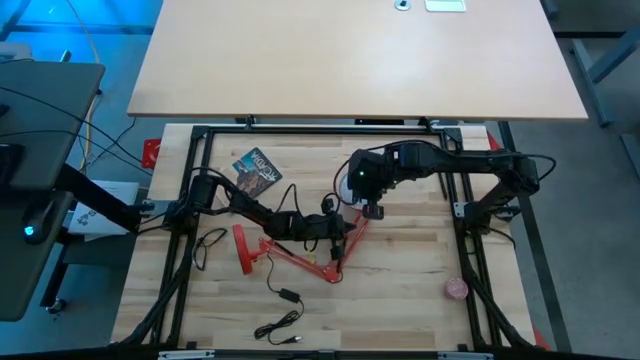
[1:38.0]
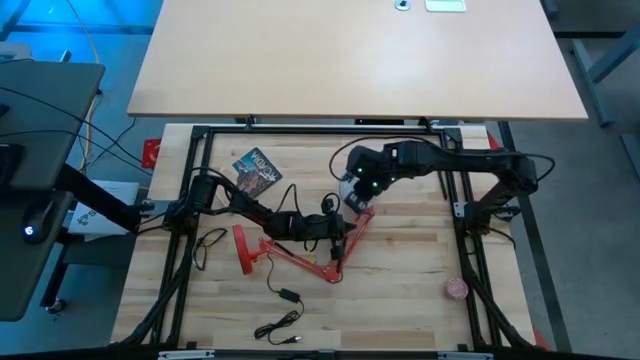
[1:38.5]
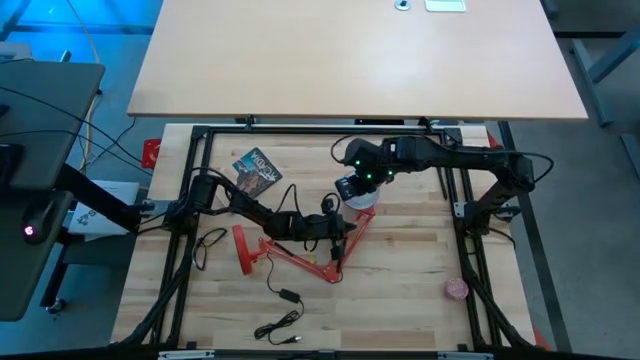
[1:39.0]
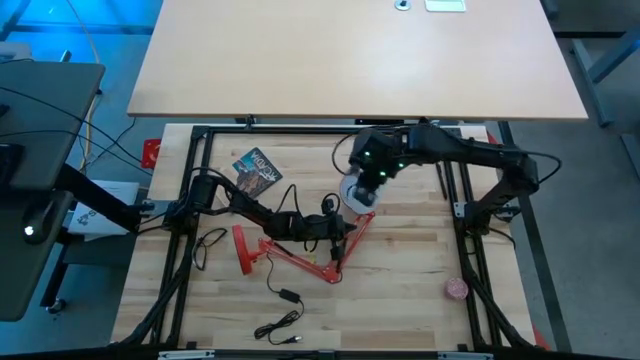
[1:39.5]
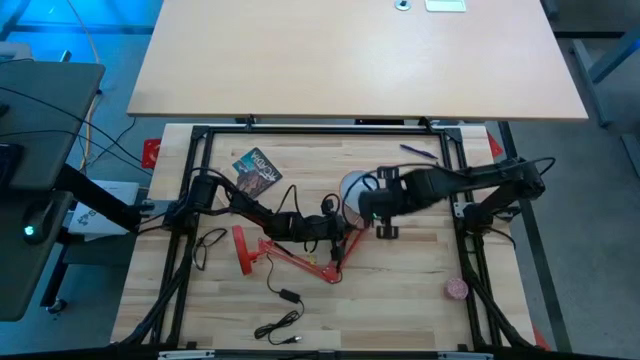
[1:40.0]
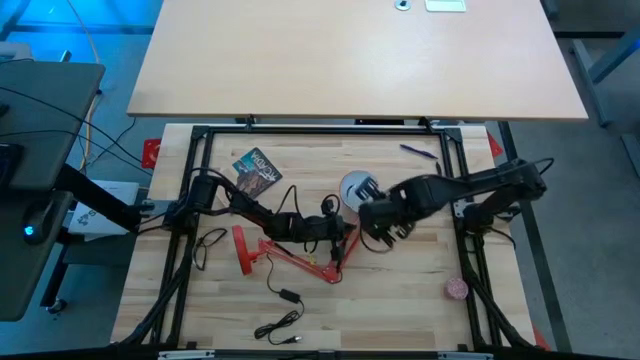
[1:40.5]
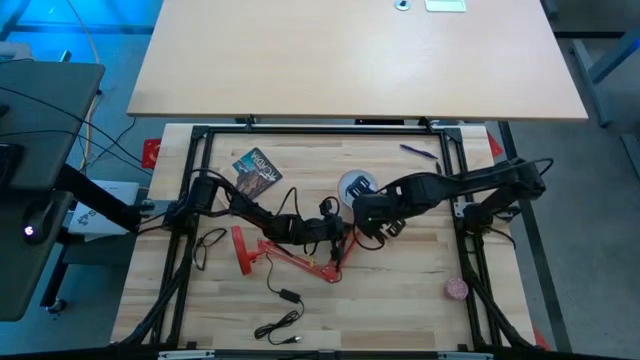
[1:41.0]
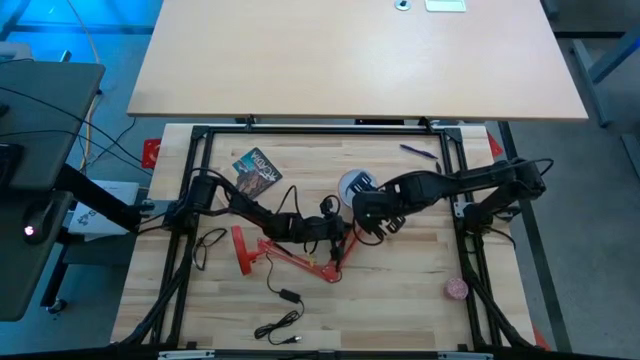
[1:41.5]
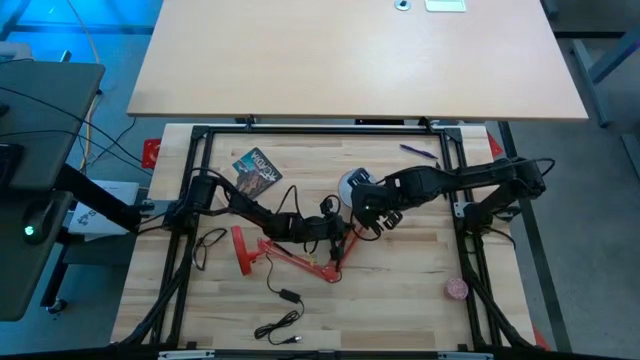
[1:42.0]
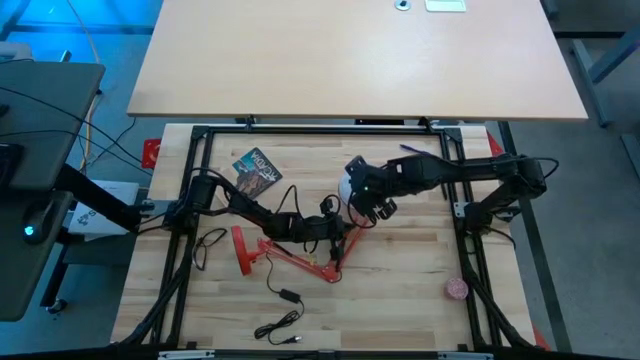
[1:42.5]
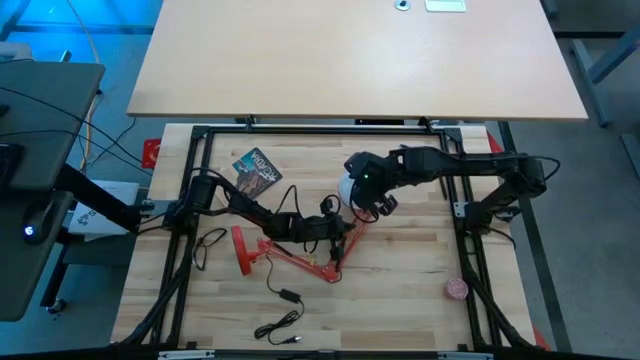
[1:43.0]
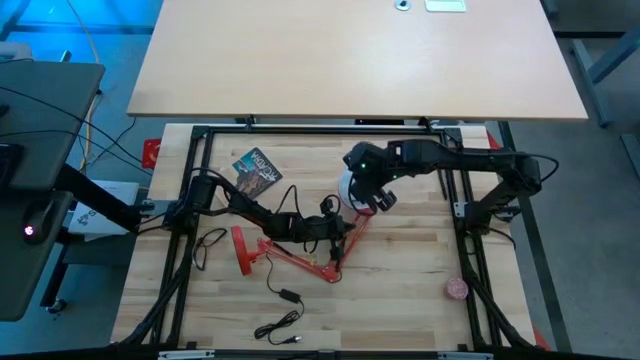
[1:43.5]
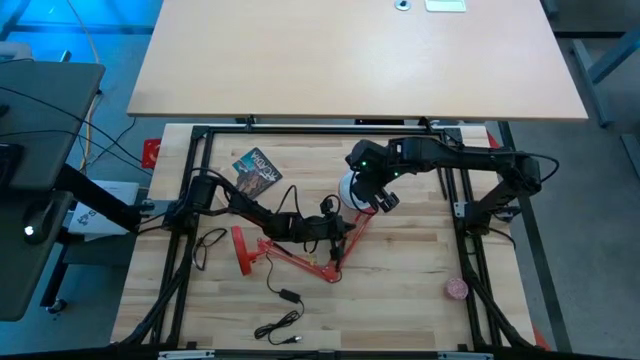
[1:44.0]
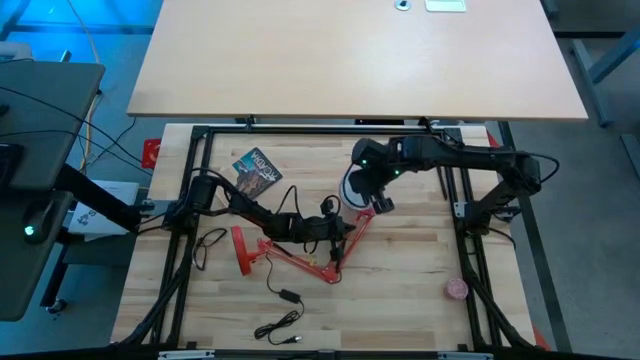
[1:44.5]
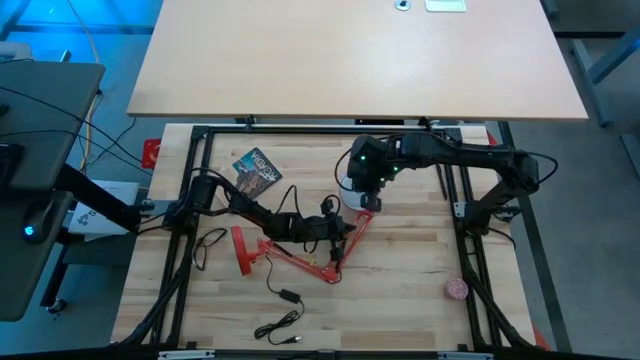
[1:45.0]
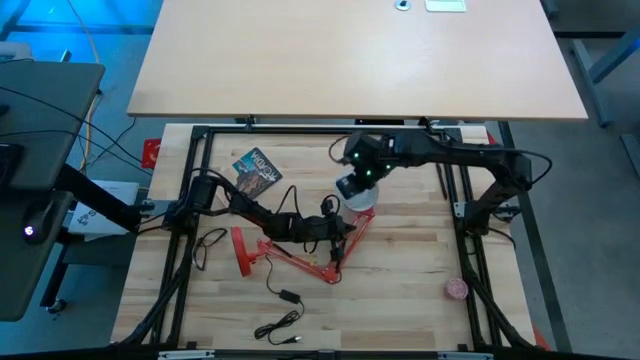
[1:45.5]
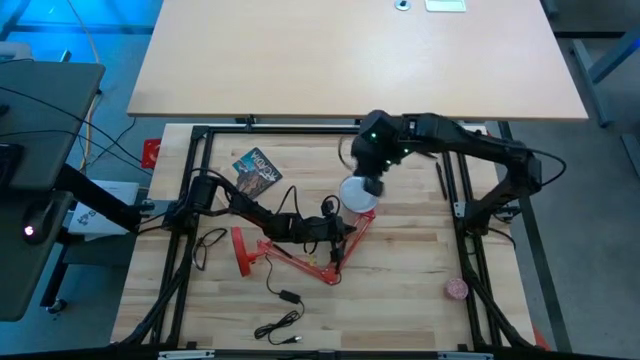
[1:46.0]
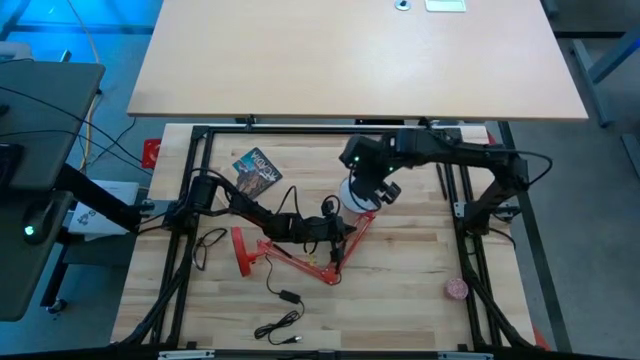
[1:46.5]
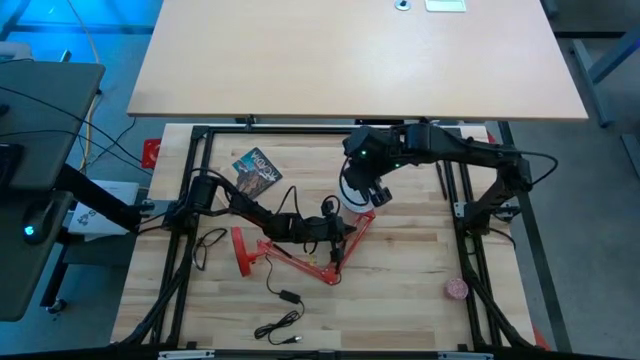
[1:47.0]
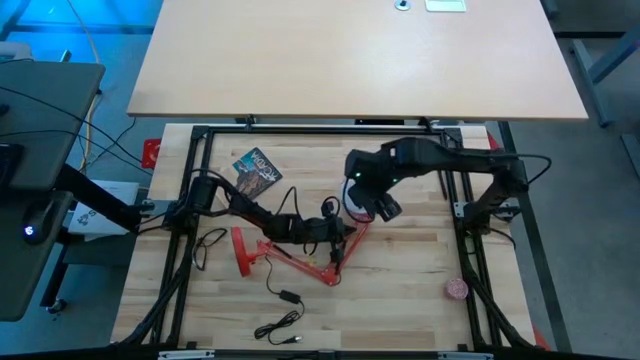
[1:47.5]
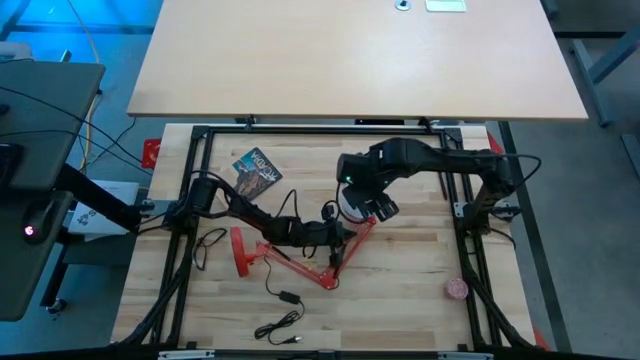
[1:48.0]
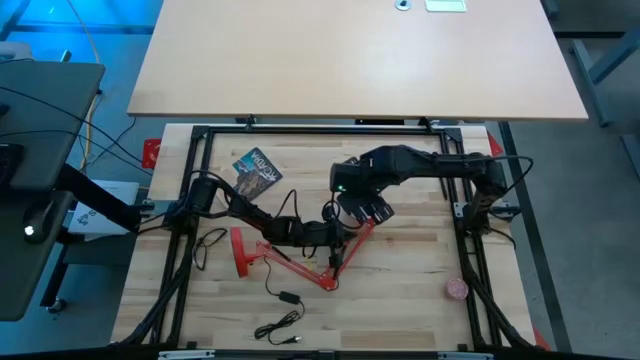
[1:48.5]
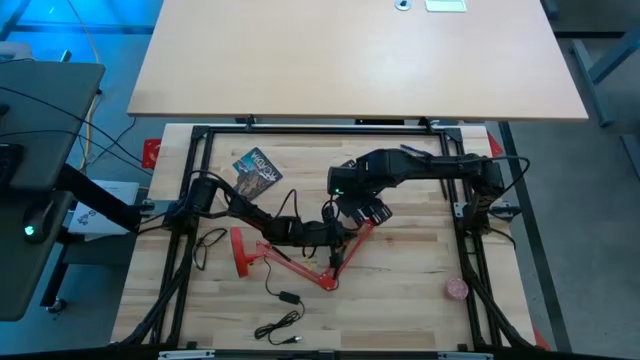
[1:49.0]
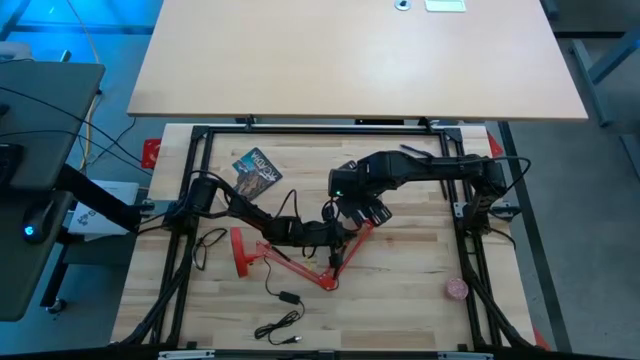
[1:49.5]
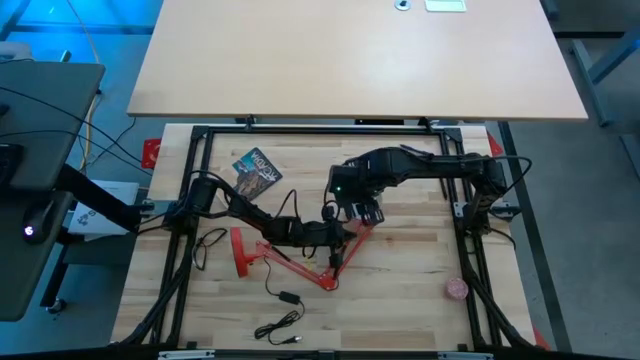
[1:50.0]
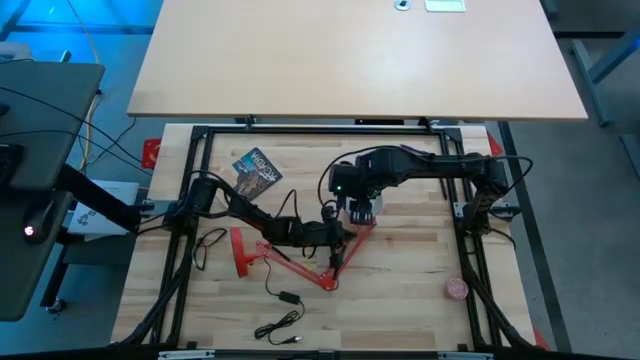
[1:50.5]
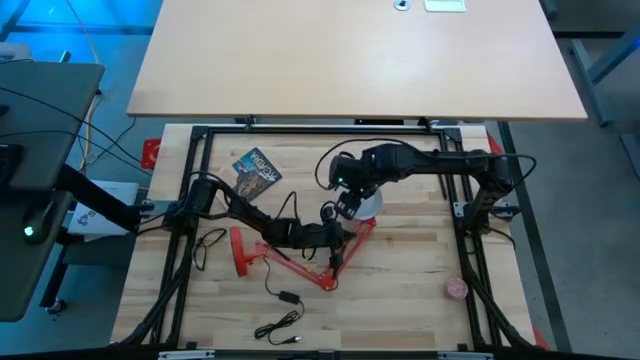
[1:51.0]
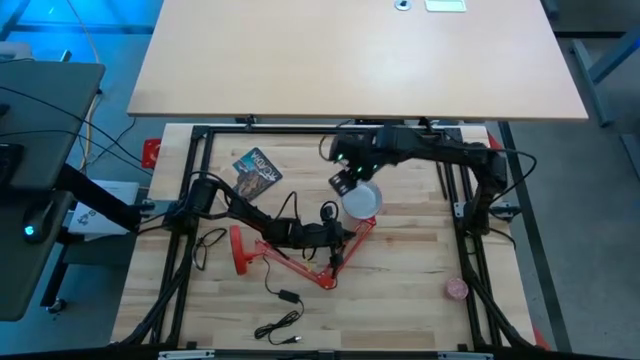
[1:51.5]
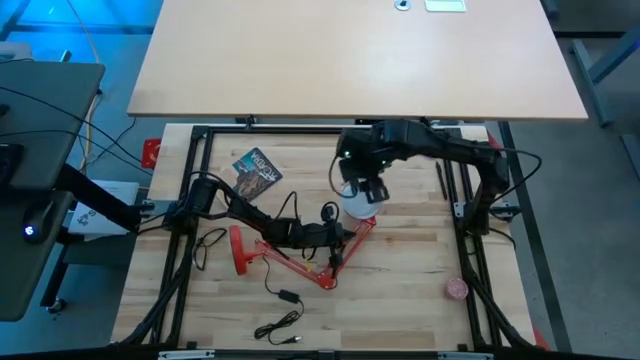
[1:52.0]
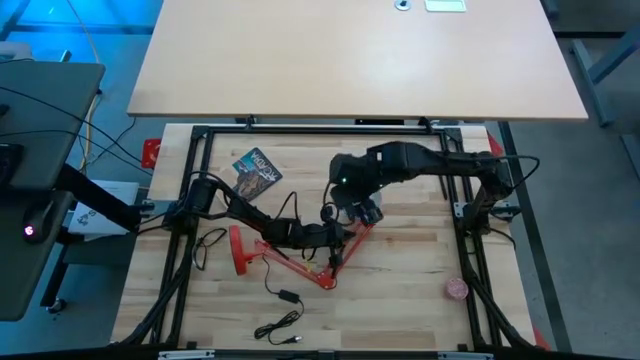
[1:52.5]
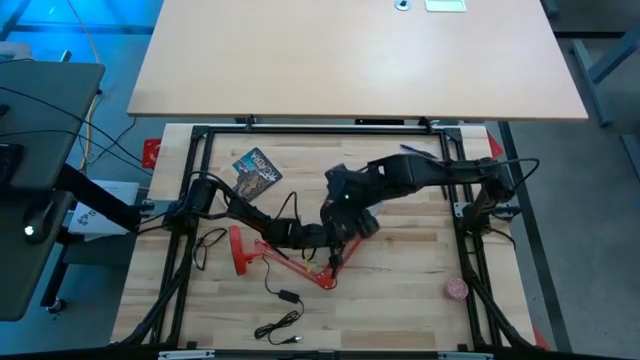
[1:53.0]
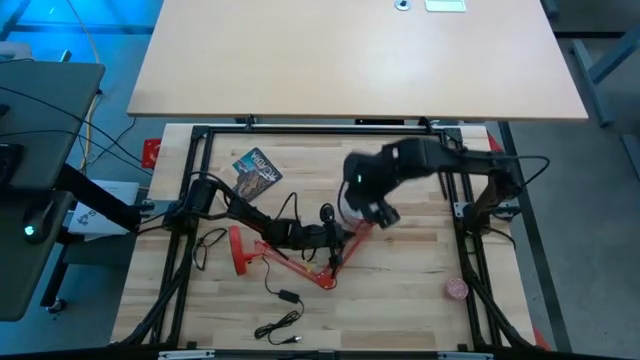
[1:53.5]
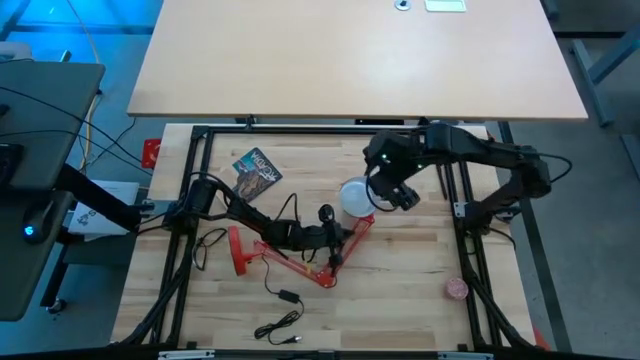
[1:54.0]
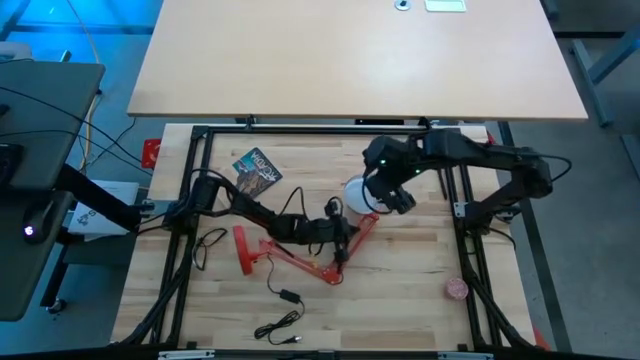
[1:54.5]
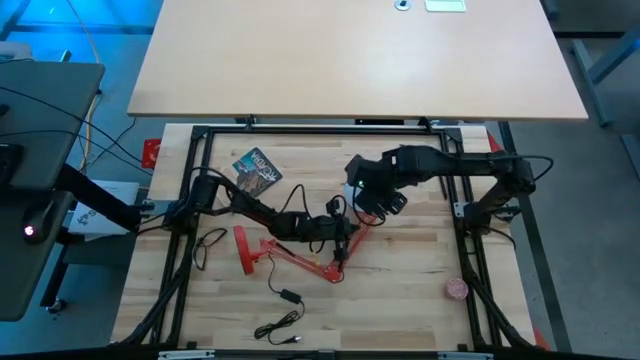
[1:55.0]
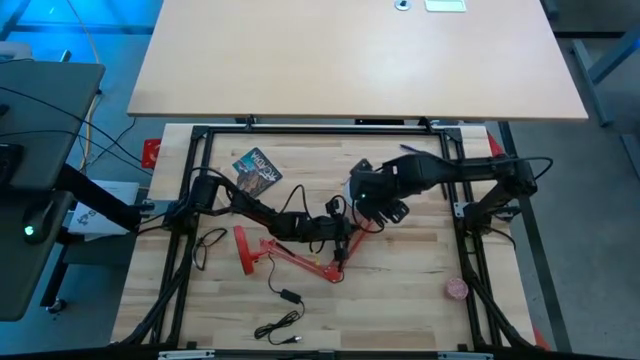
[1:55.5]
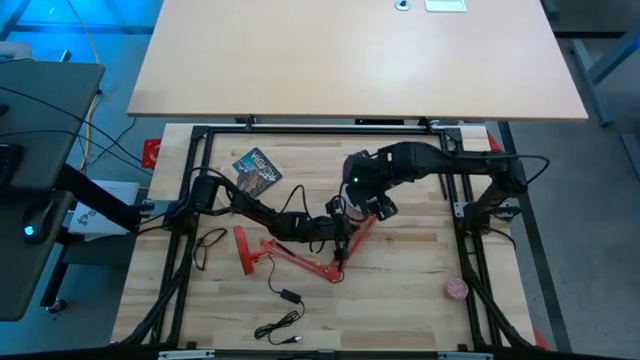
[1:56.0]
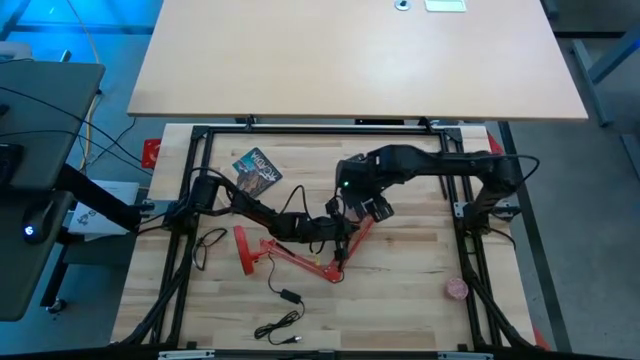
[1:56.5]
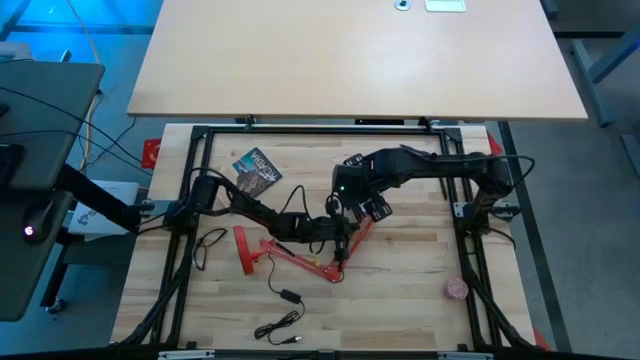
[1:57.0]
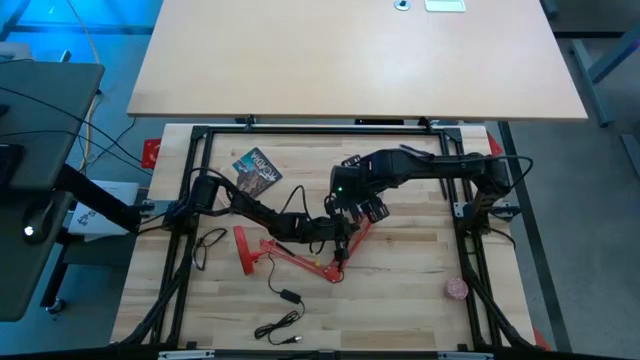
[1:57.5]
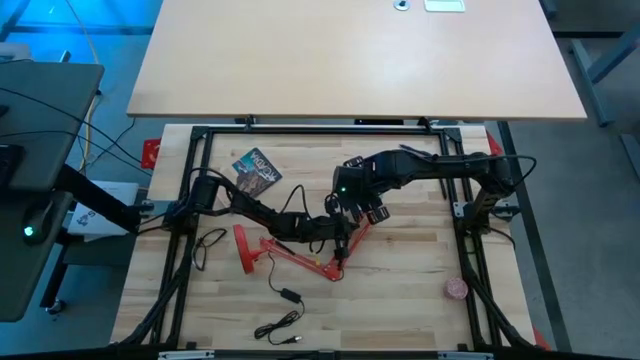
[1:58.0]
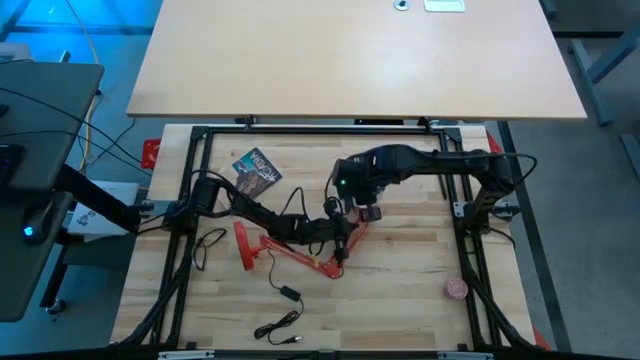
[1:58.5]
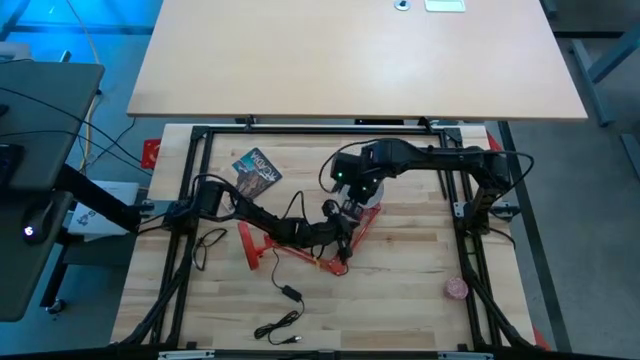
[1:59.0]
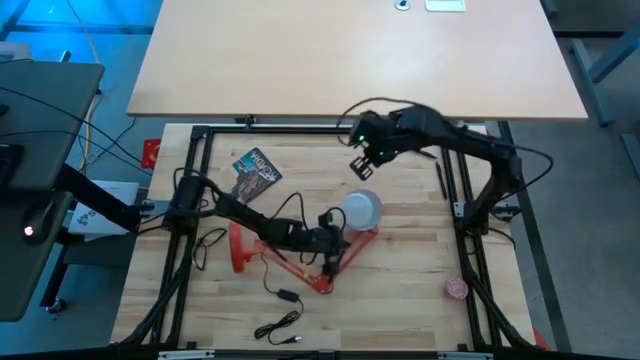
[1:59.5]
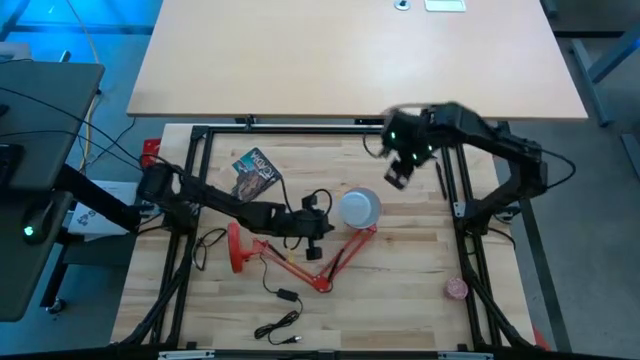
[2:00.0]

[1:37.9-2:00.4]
Task: Screw lightbulb
Insert the lightbulb into the red lamp
